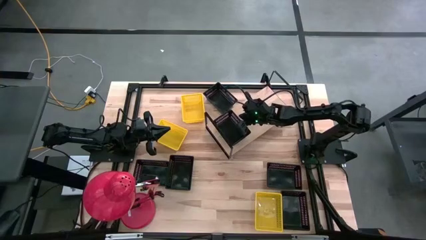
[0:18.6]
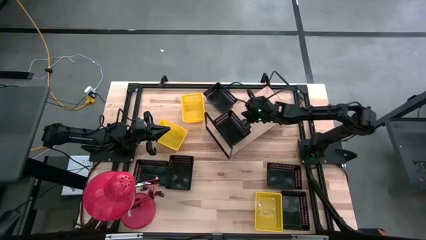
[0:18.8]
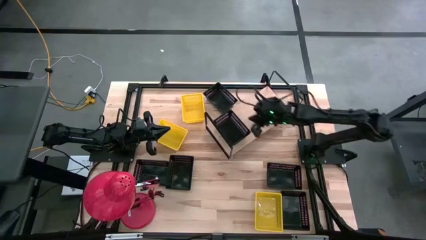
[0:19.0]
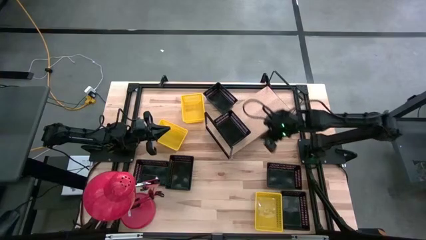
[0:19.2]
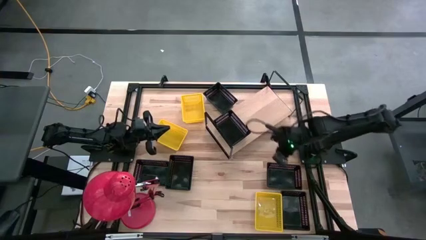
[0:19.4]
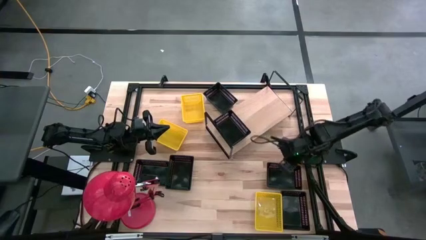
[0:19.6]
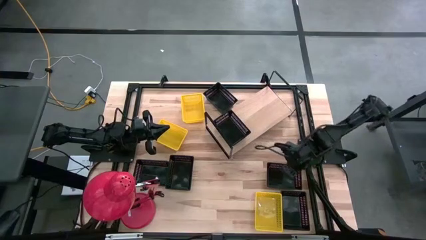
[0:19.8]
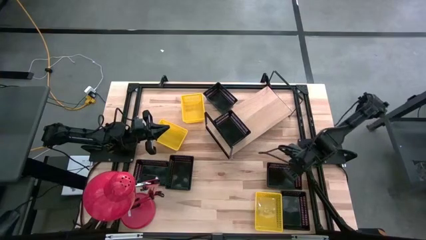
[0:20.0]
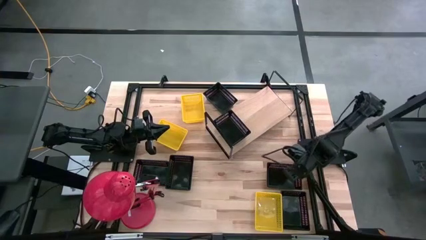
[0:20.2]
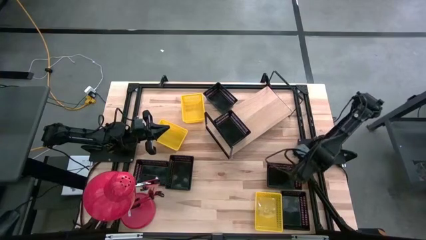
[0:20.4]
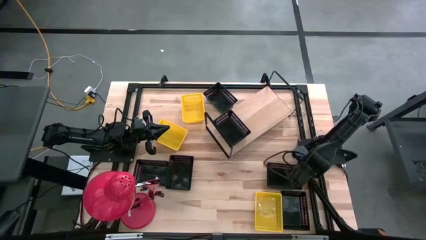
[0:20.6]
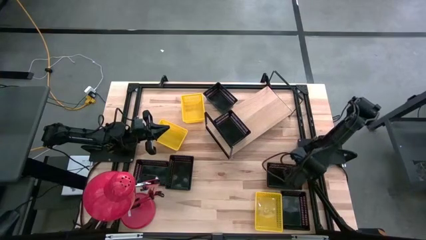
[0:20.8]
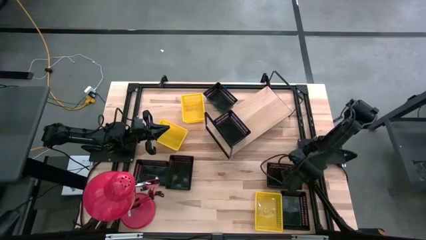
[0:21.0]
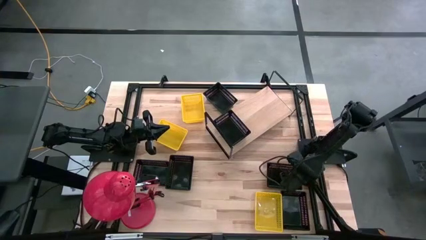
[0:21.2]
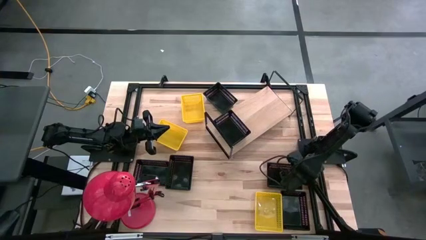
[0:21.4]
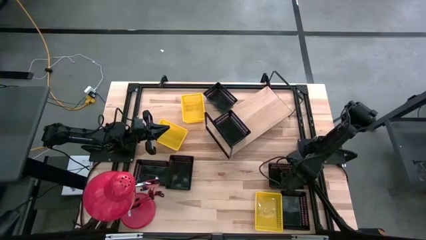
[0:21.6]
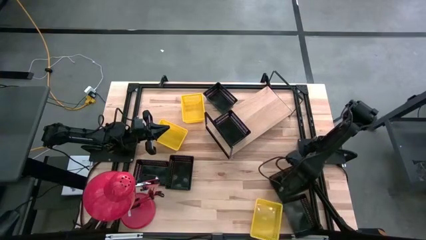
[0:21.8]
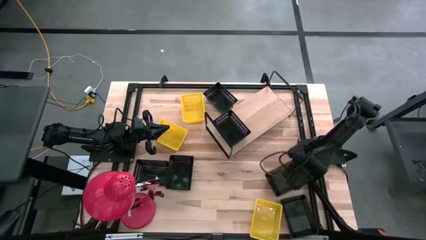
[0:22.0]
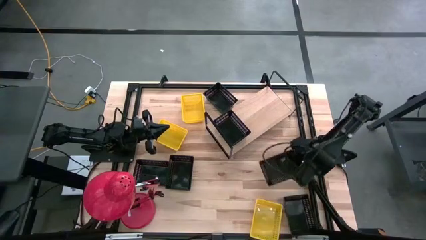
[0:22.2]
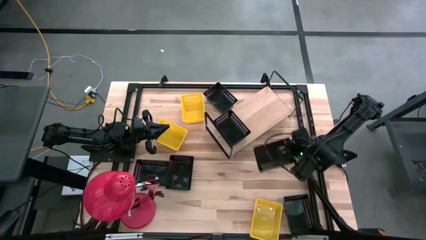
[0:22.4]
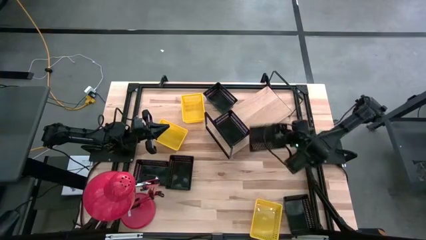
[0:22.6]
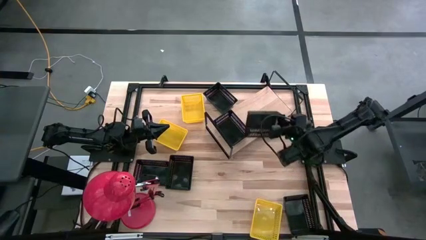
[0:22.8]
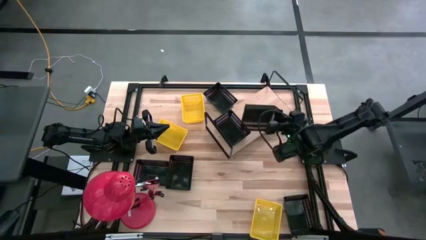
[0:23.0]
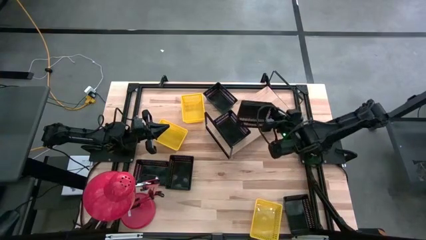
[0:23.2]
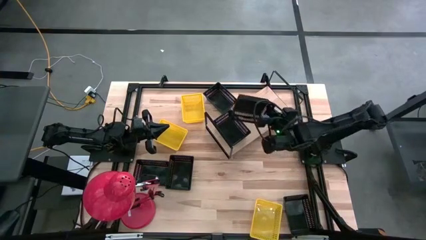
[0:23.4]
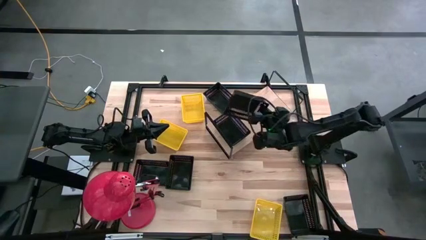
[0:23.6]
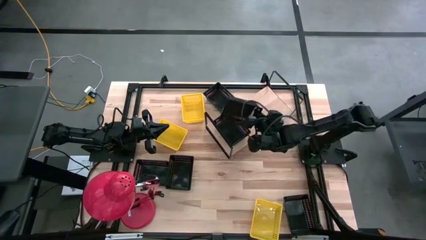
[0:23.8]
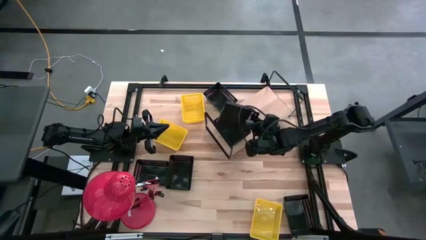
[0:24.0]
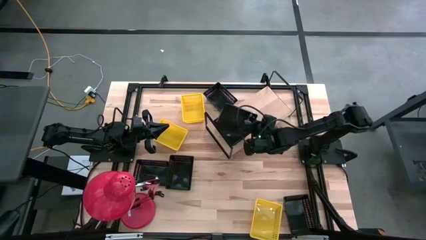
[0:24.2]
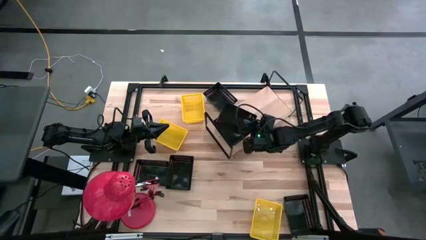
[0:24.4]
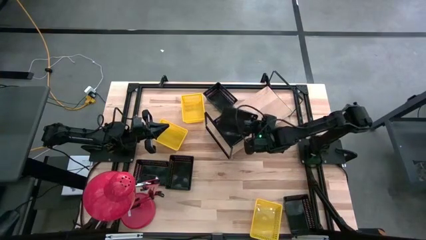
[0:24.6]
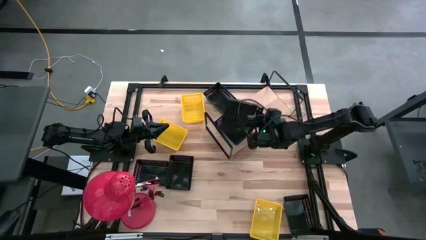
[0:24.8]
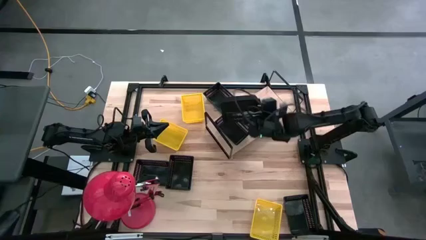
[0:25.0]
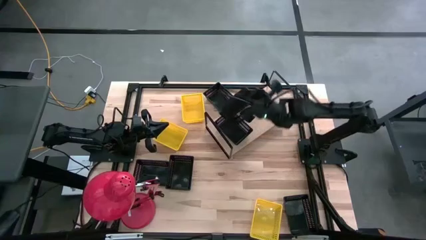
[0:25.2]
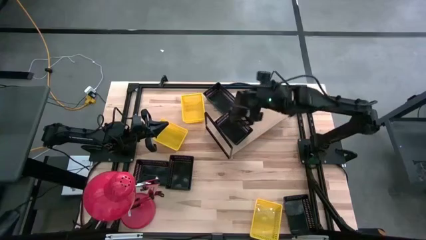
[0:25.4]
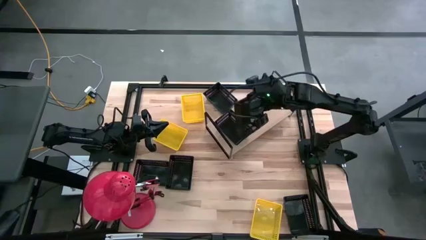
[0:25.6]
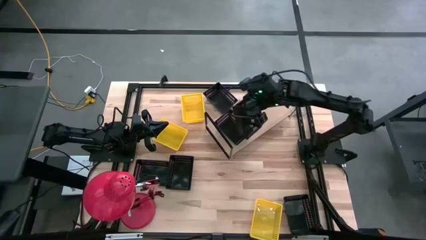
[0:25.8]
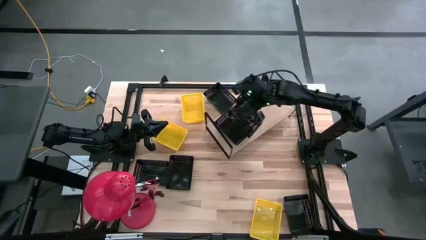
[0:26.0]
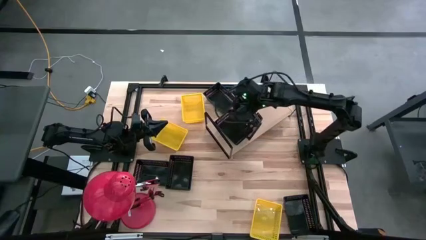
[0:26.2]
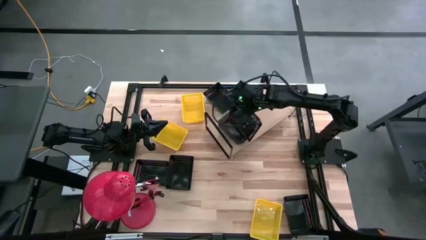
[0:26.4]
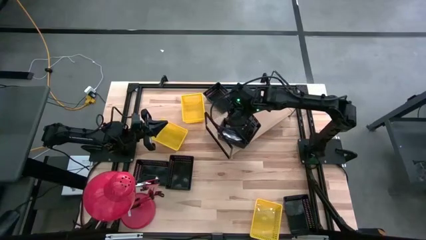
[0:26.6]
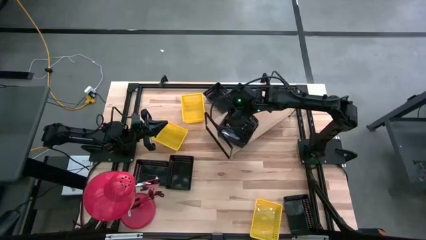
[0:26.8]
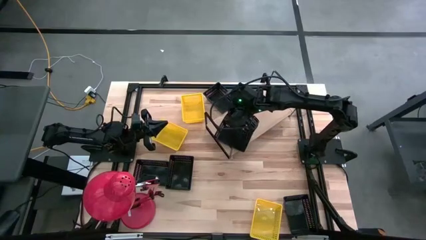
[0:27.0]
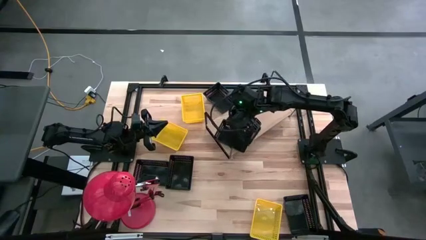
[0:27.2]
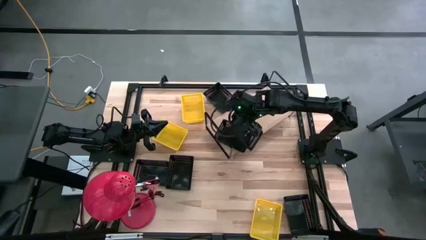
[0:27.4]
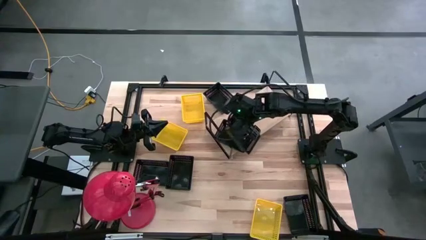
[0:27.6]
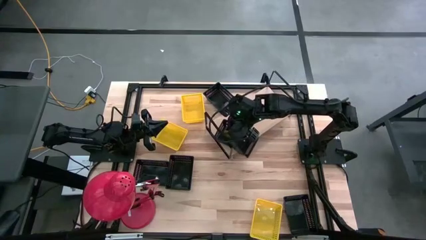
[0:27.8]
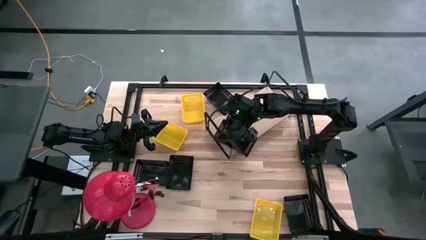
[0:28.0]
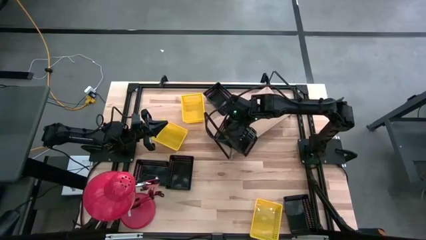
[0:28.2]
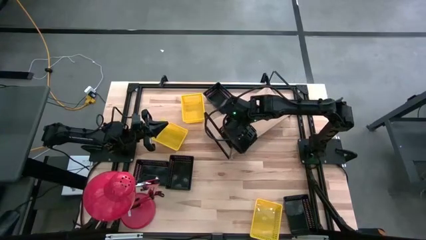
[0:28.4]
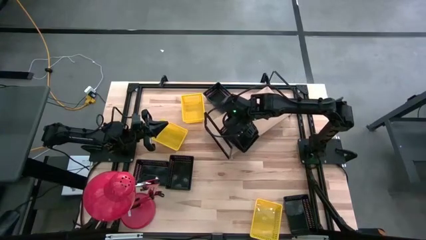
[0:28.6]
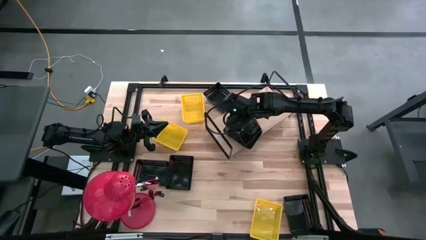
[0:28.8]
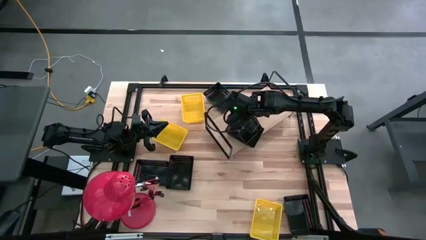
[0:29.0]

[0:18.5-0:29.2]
Task: Stack baskets on shelf by color
Stack the black bin on top of the black bin on the shelf
